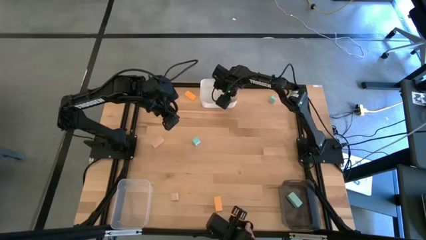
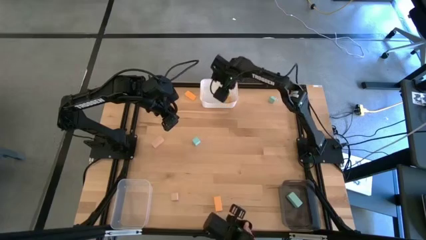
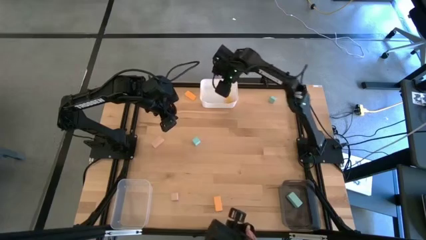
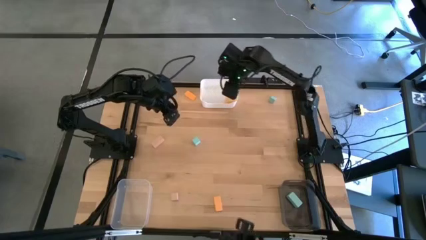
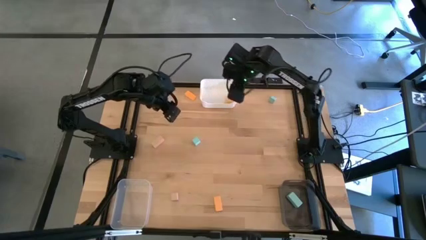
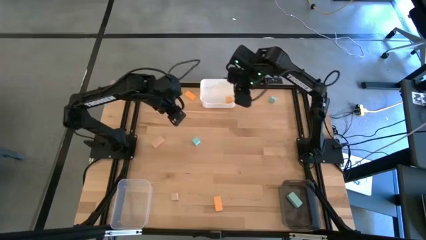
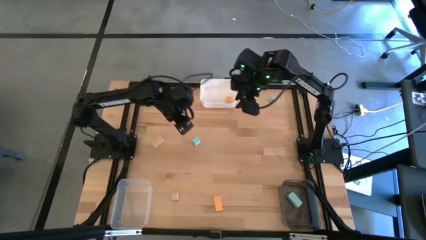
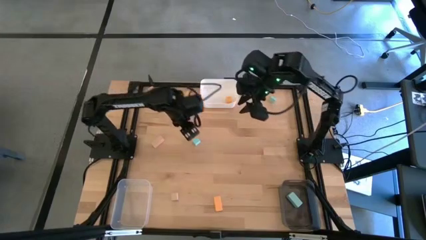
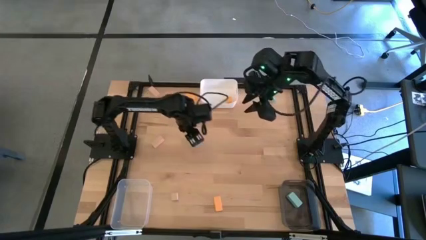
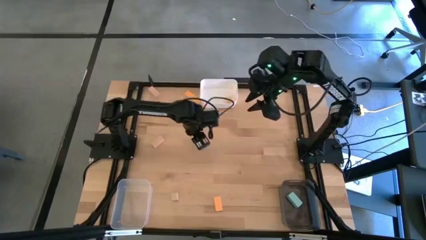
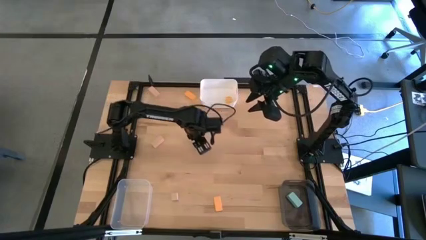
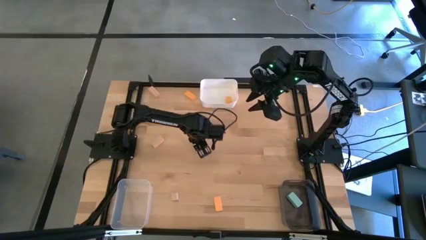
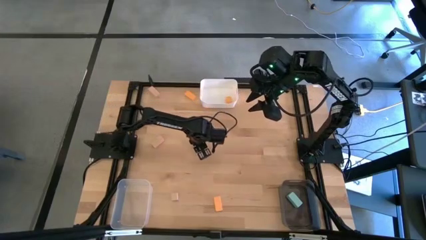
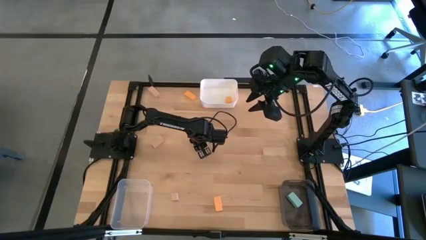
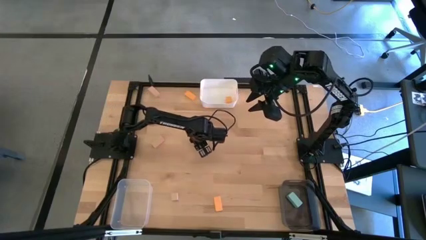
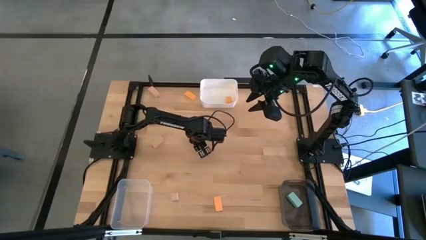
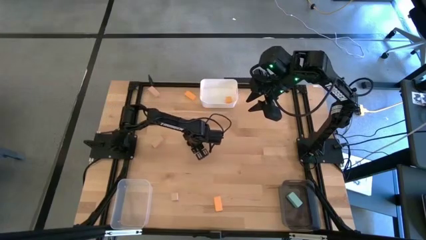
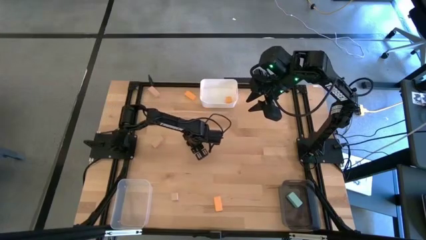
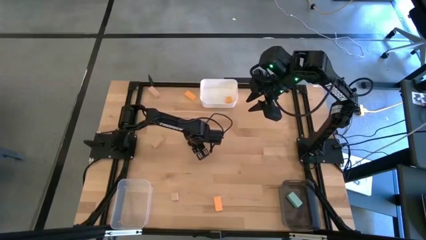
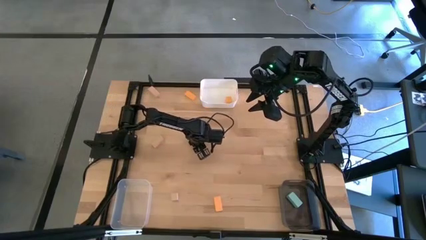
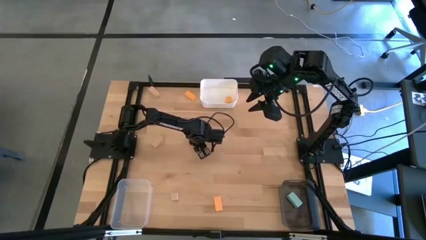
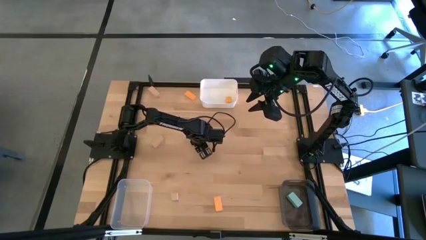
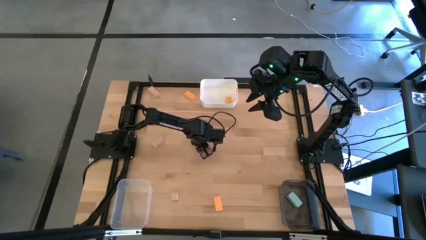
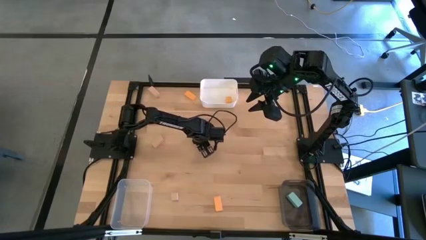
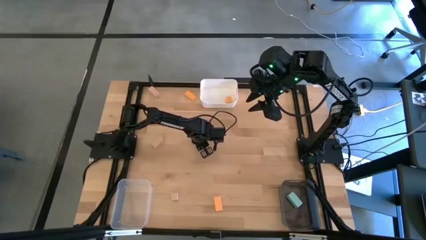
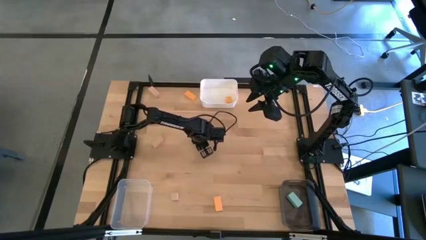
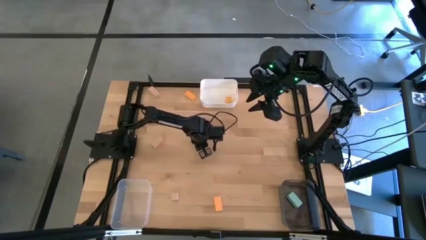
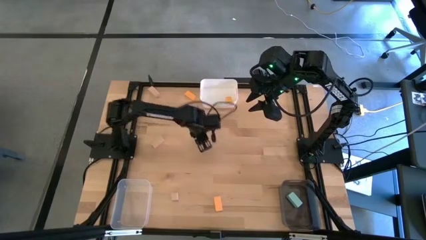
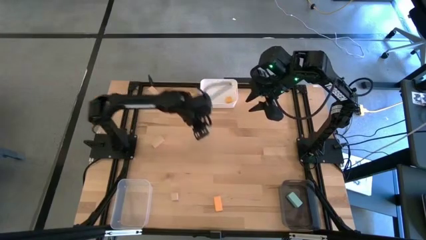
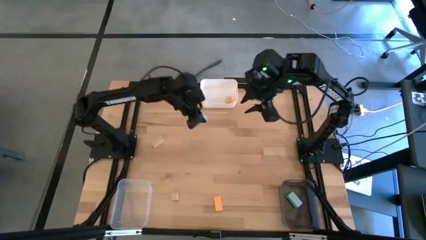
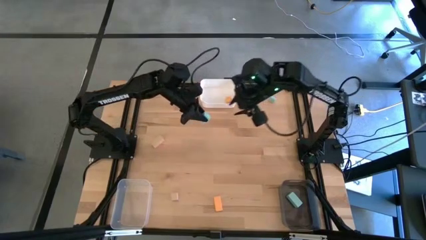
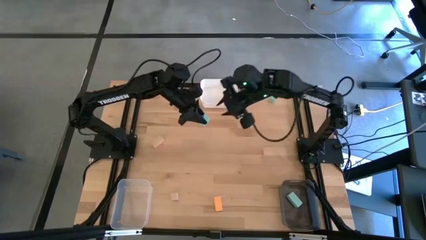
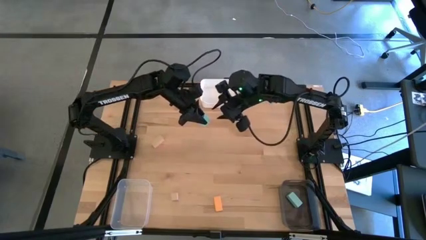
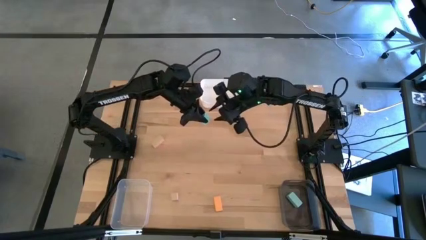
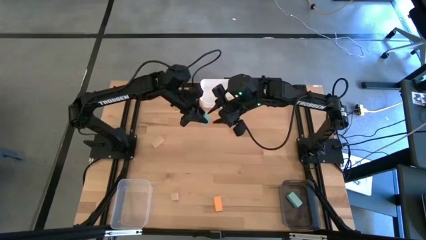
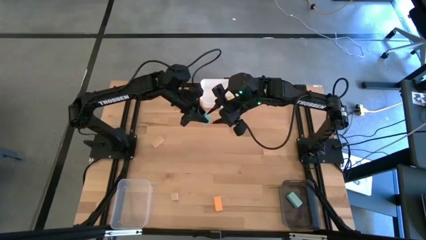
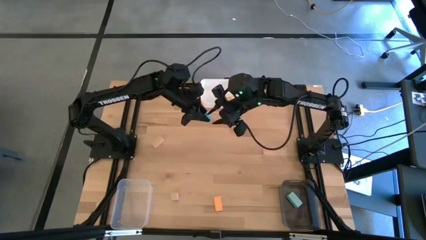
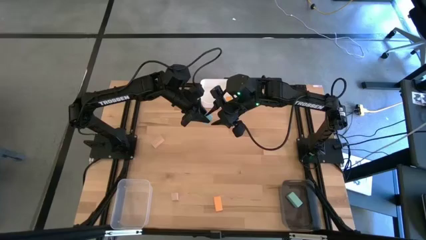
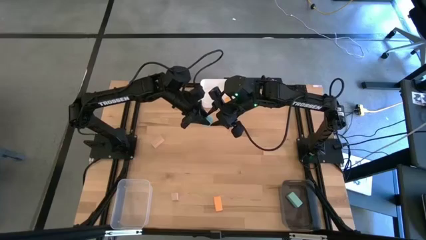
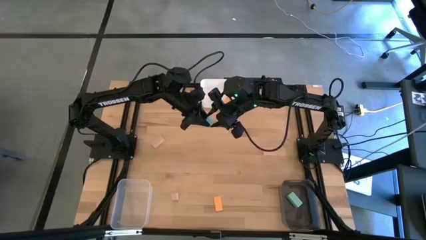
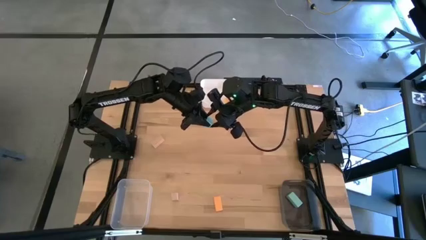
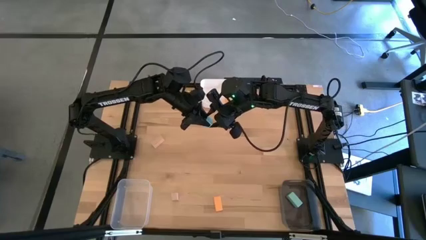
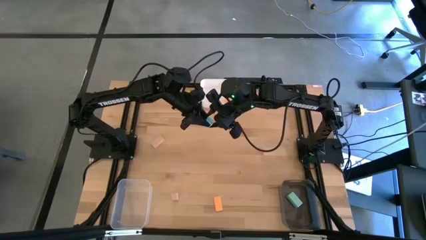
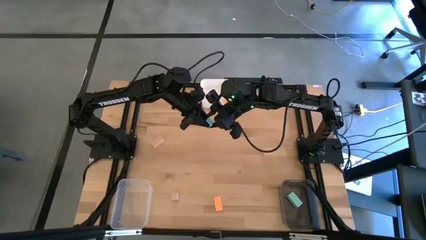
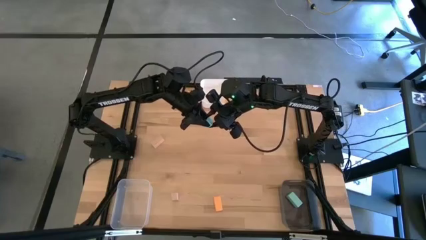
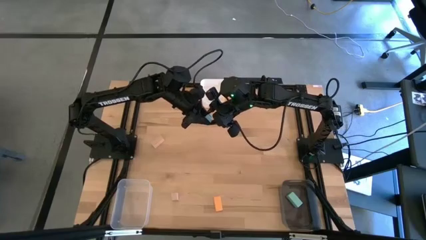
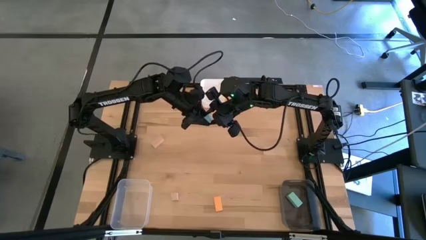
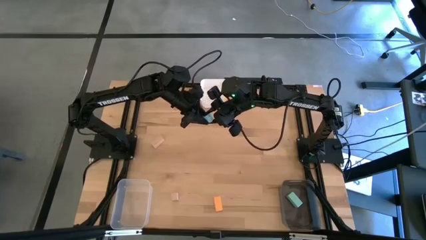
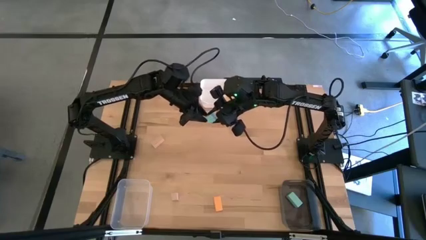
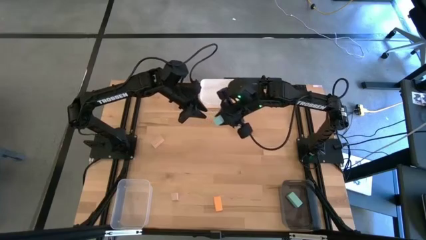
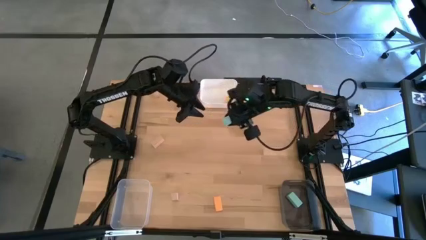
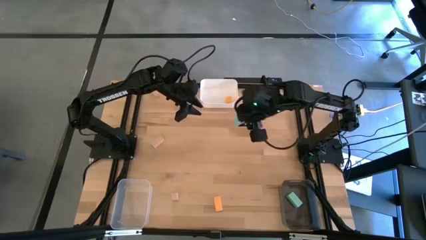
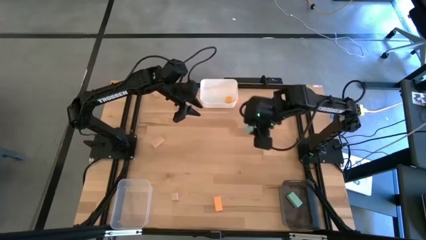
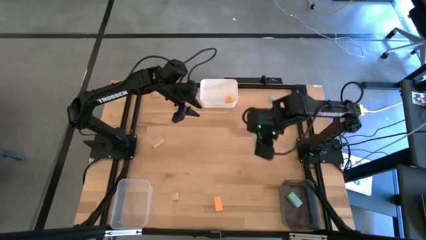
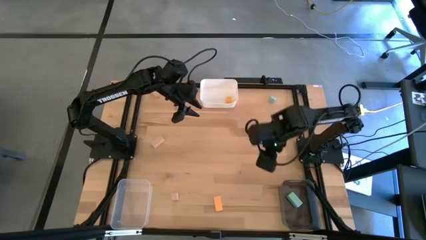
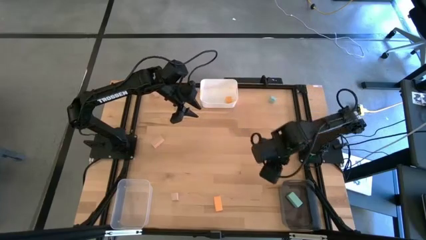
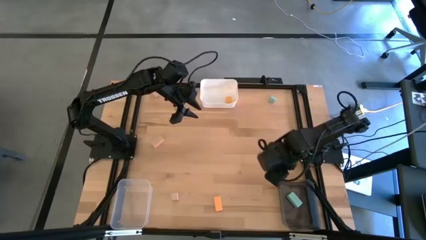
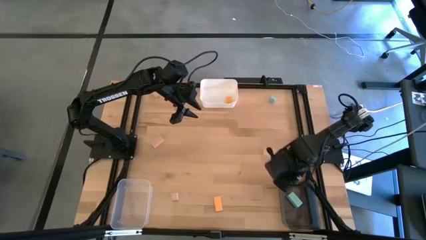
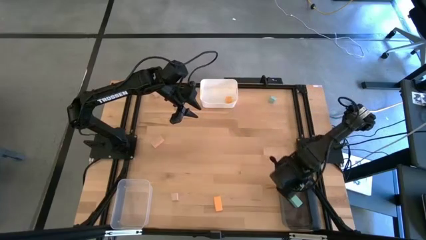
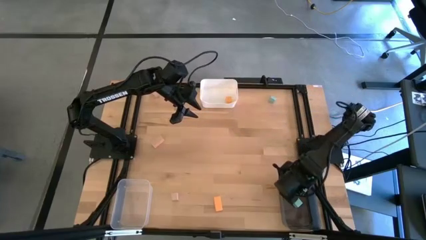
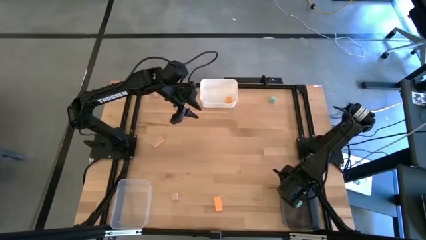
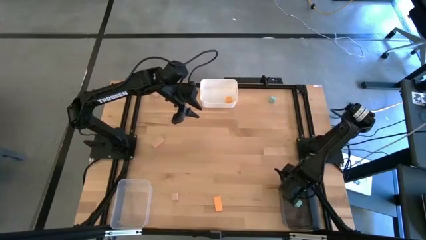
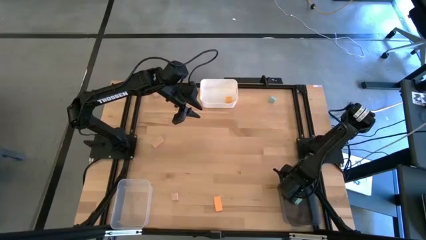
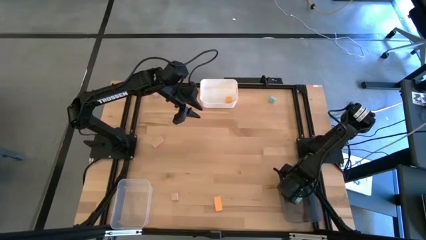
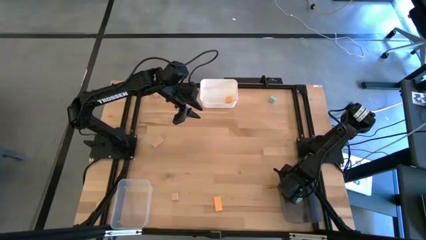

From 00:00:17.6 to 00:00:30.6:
Task: Sort & place blocks by color
Put the bottom light blue block into the black bin

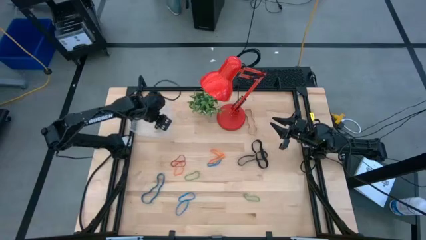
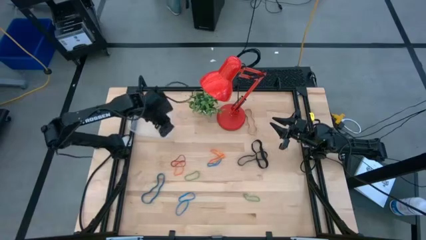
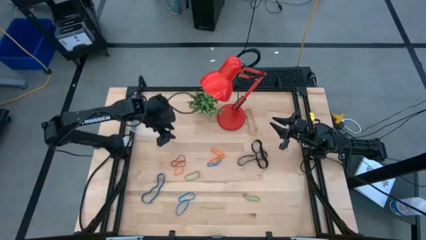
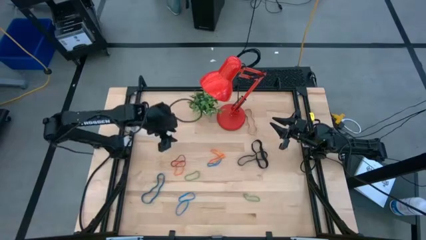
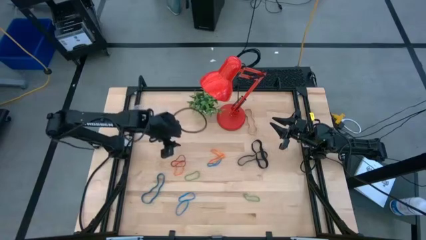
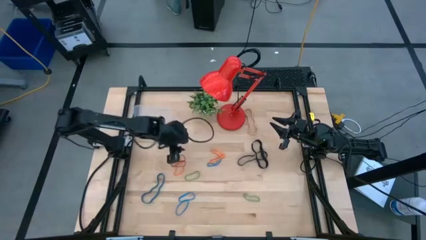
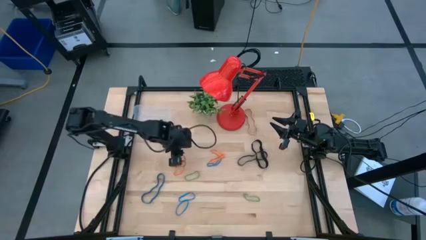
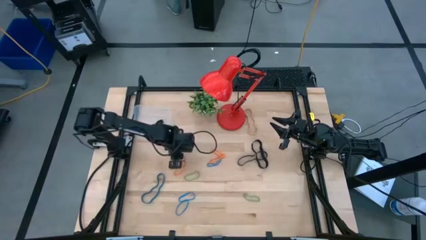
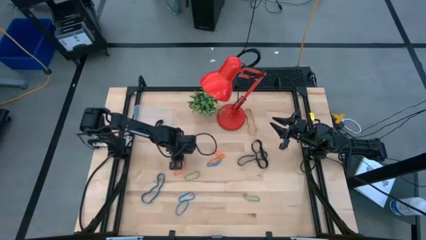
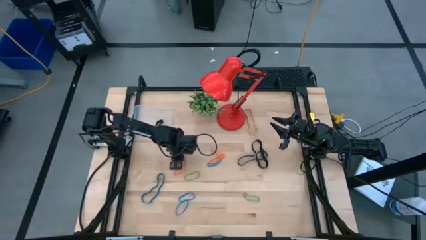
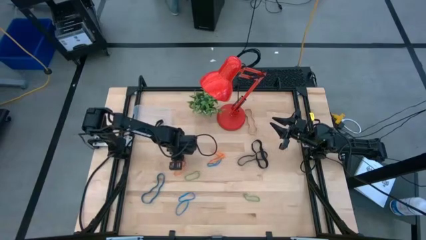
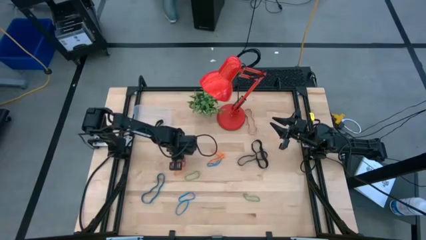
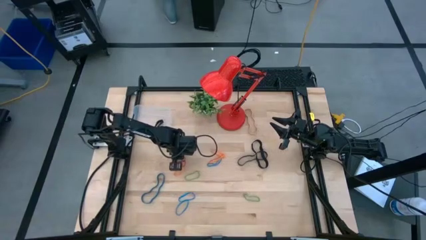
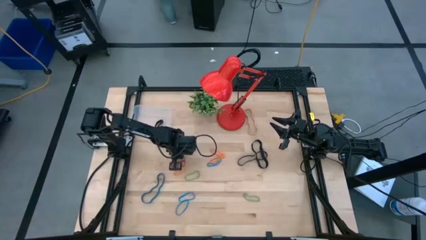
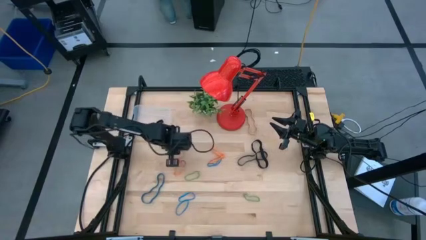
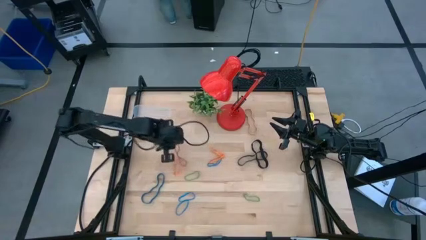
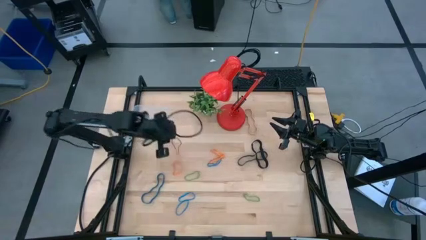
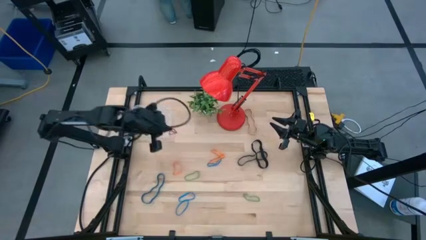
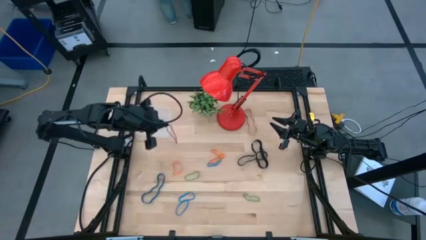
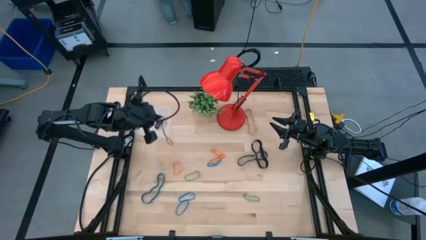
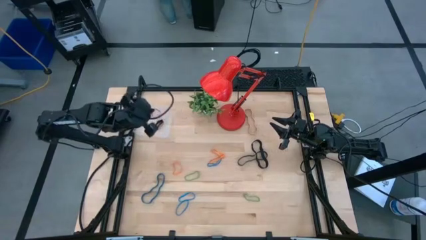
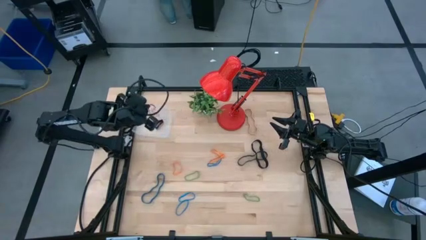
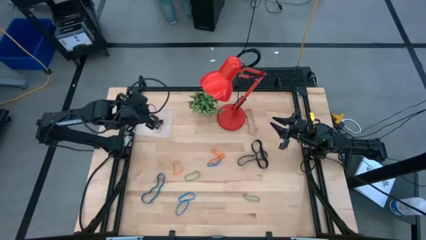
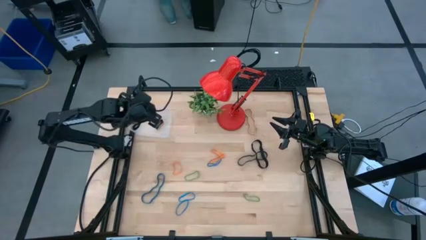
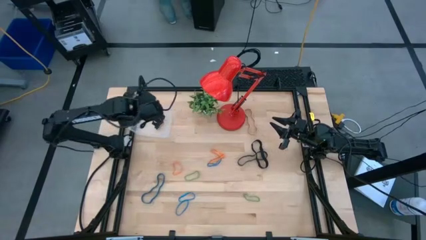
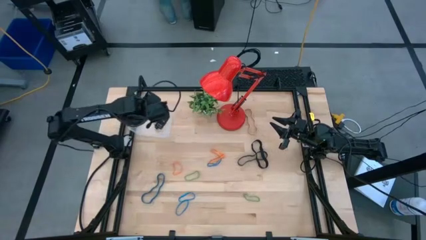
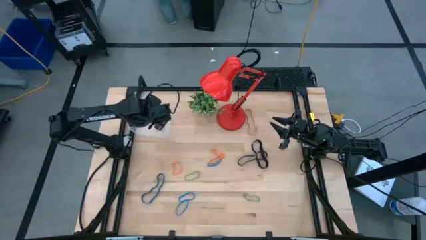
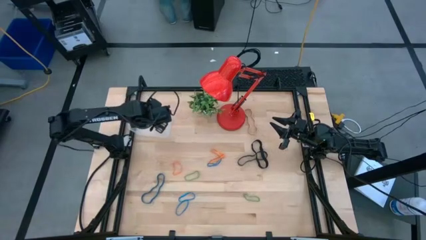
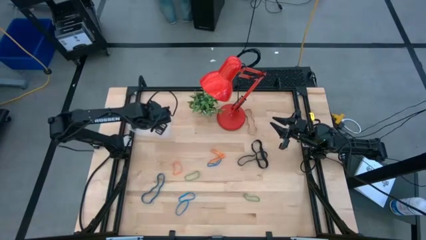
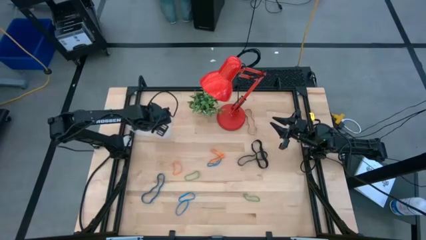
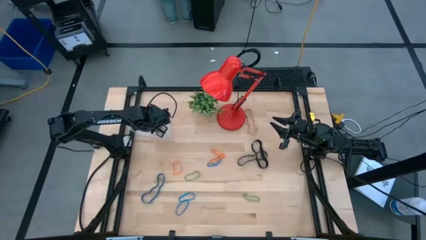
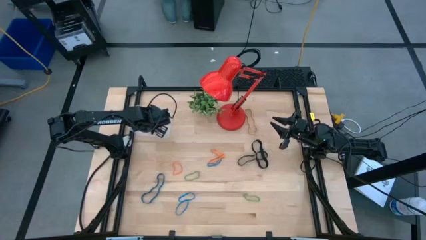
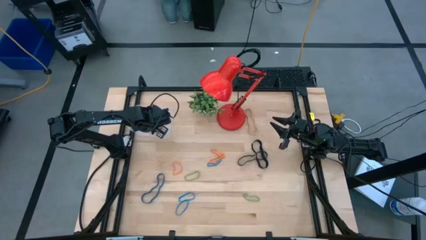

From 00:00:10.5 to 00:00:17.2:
Task: Pick and place rubber bands into bin
Put the red rubber band into the transparent bin
